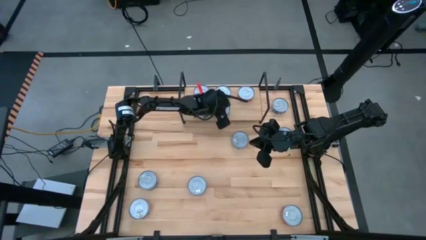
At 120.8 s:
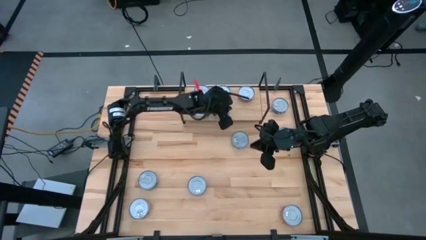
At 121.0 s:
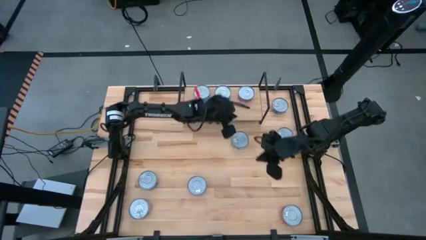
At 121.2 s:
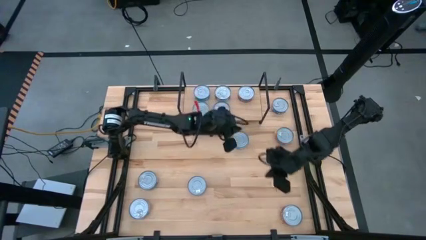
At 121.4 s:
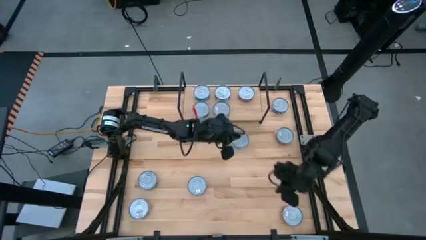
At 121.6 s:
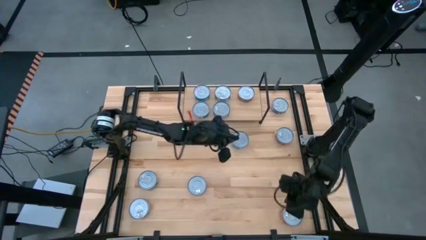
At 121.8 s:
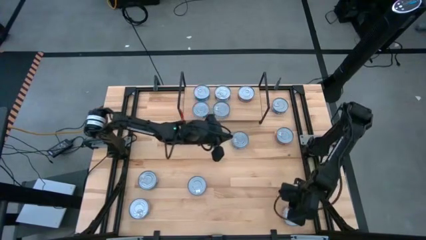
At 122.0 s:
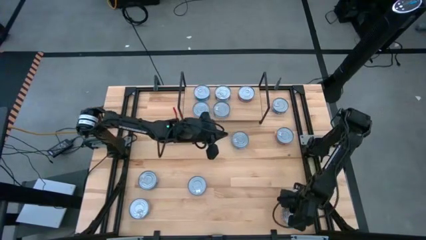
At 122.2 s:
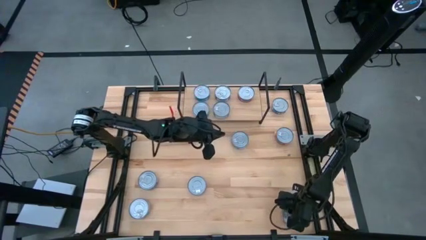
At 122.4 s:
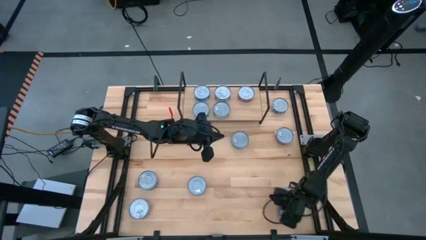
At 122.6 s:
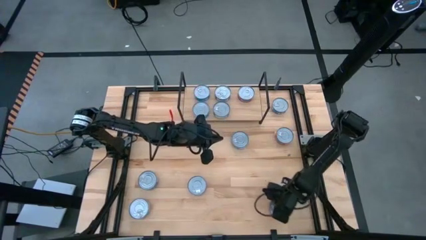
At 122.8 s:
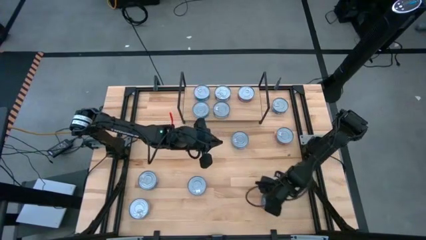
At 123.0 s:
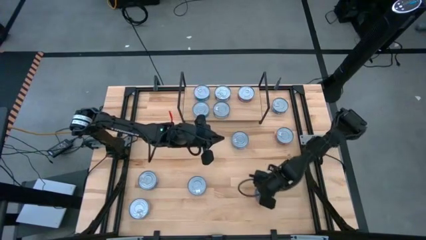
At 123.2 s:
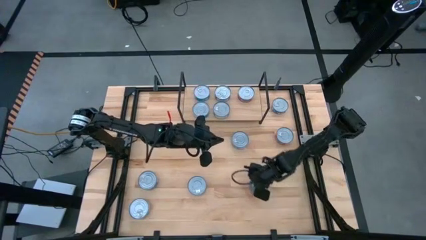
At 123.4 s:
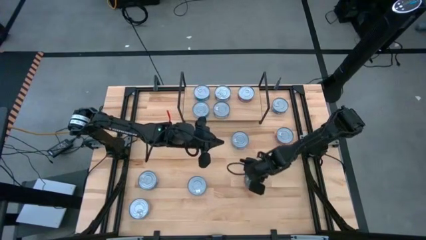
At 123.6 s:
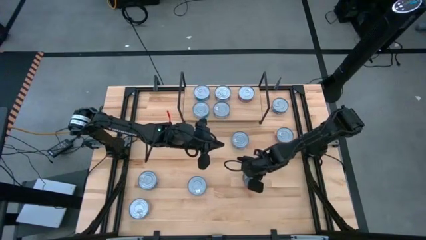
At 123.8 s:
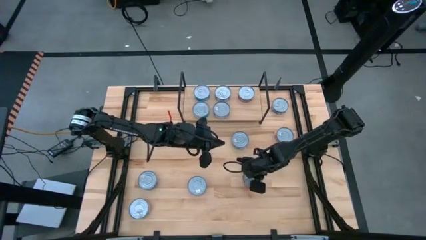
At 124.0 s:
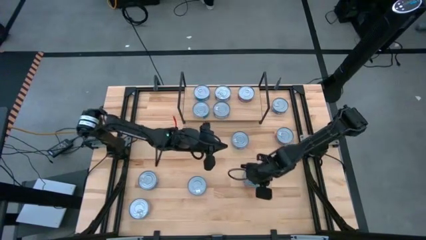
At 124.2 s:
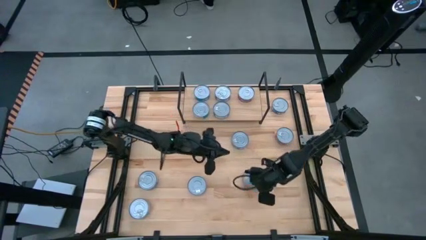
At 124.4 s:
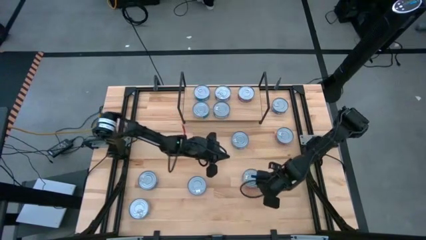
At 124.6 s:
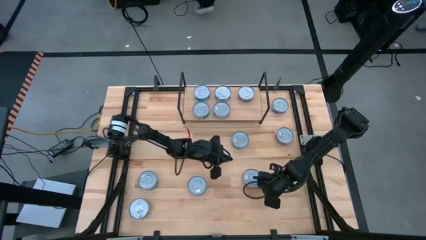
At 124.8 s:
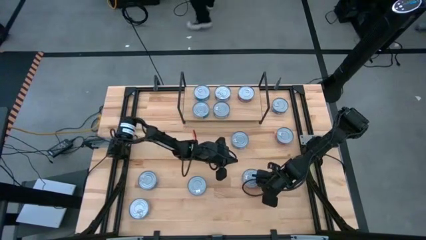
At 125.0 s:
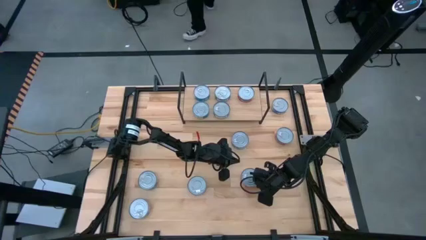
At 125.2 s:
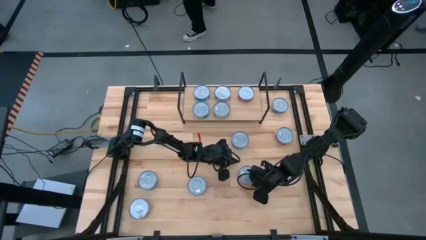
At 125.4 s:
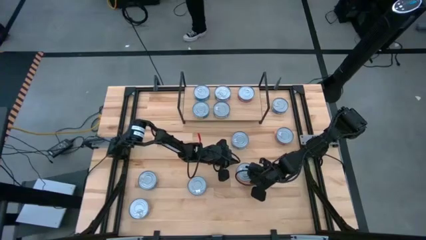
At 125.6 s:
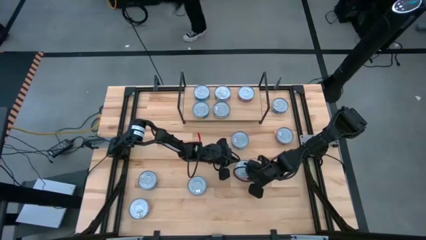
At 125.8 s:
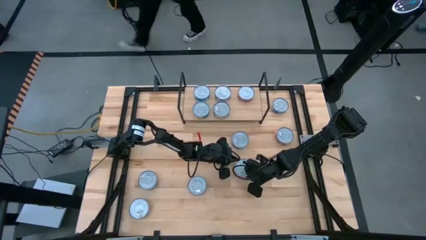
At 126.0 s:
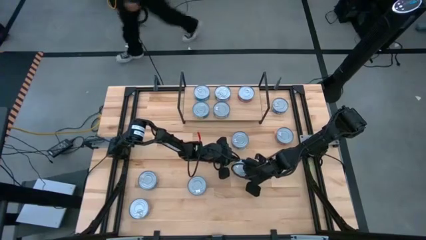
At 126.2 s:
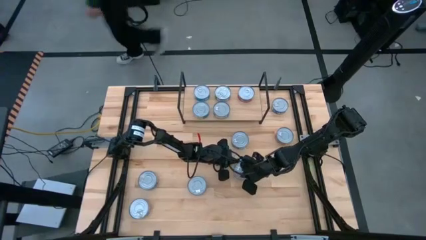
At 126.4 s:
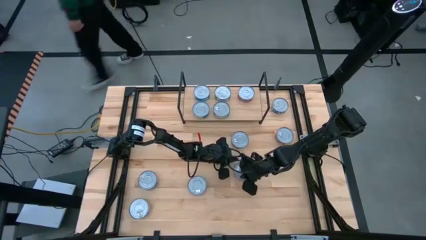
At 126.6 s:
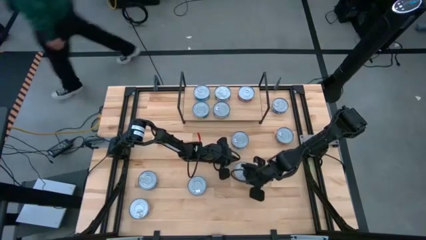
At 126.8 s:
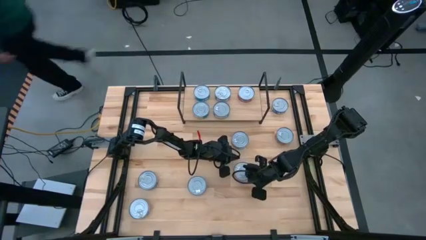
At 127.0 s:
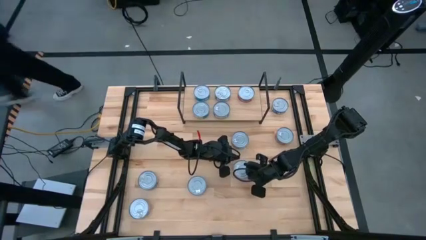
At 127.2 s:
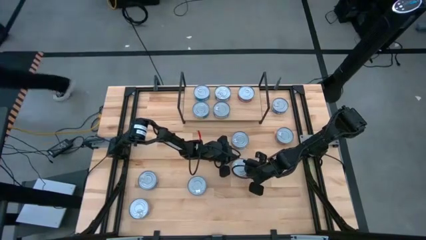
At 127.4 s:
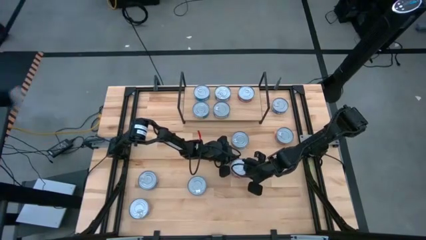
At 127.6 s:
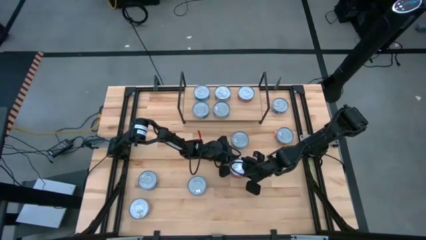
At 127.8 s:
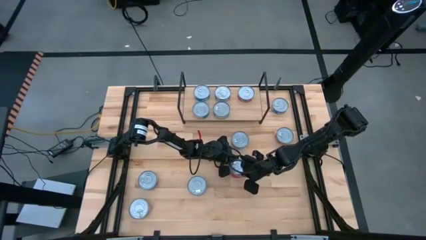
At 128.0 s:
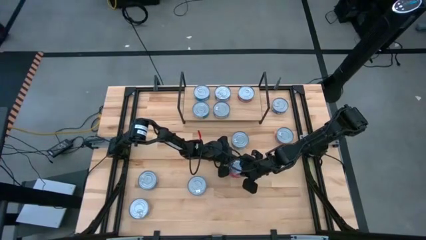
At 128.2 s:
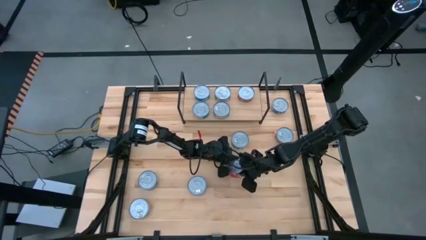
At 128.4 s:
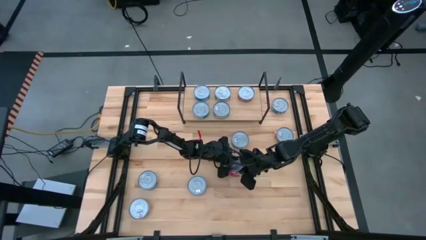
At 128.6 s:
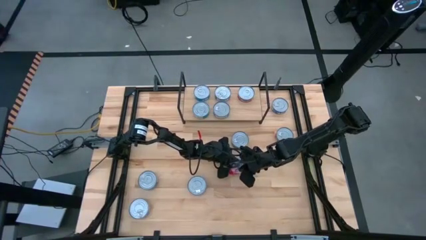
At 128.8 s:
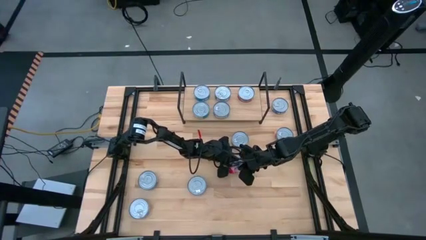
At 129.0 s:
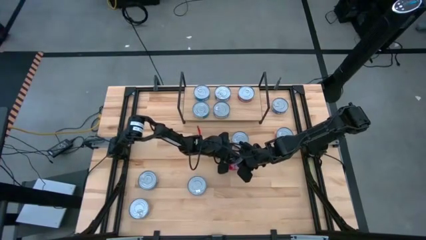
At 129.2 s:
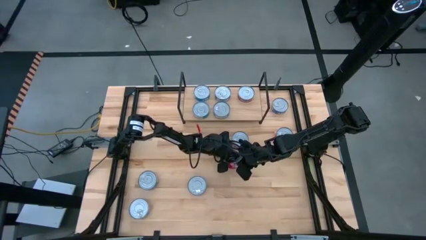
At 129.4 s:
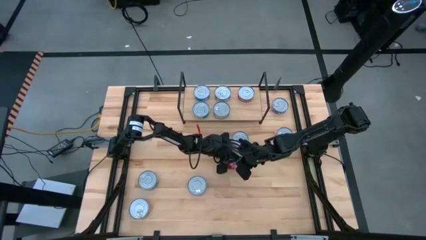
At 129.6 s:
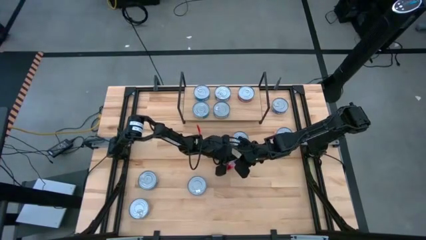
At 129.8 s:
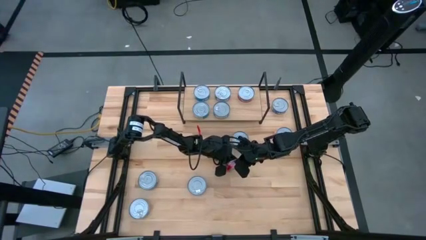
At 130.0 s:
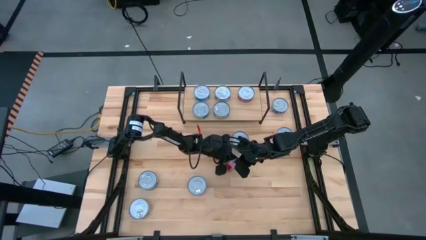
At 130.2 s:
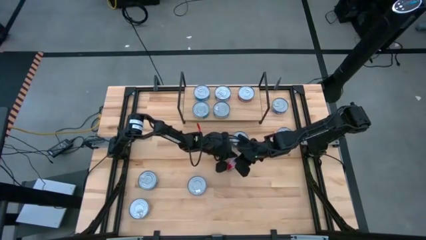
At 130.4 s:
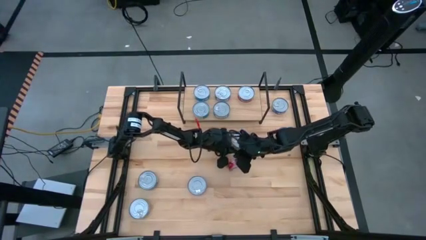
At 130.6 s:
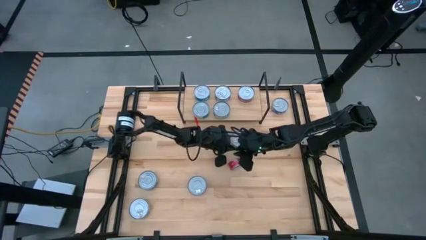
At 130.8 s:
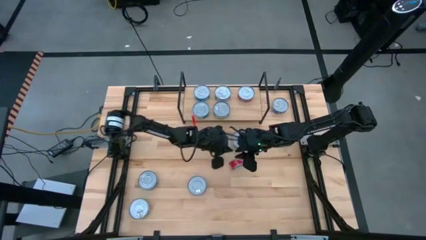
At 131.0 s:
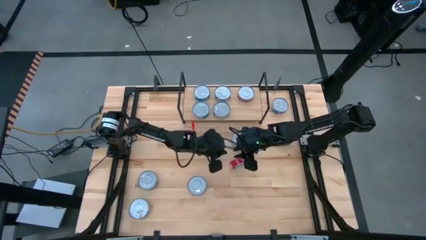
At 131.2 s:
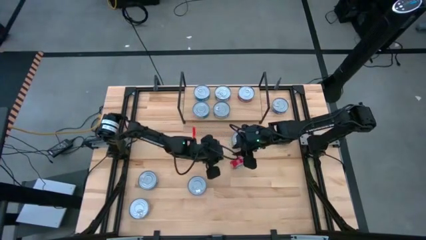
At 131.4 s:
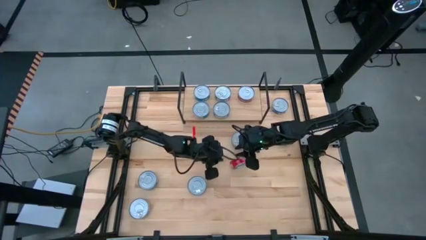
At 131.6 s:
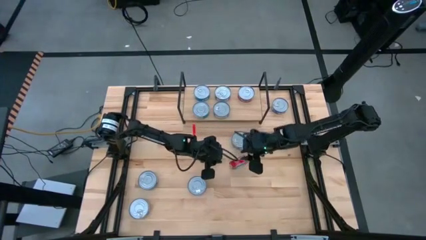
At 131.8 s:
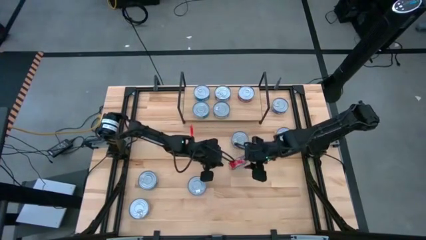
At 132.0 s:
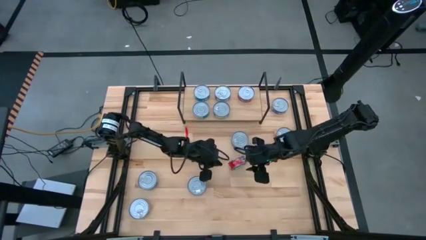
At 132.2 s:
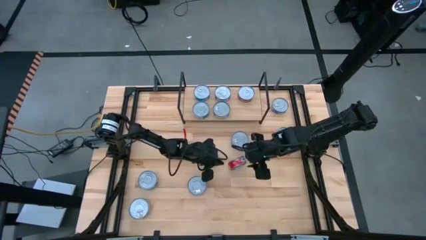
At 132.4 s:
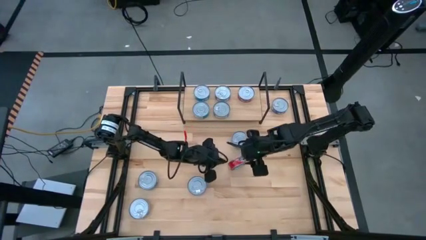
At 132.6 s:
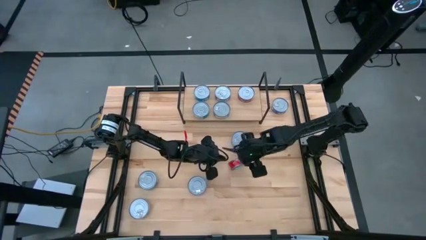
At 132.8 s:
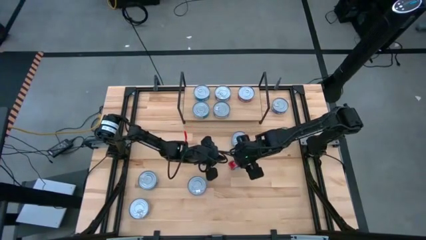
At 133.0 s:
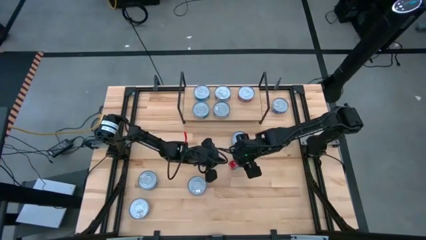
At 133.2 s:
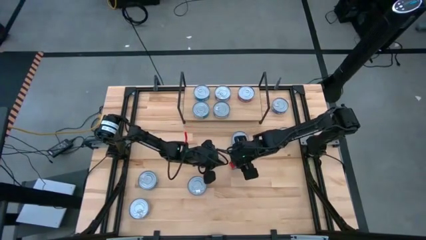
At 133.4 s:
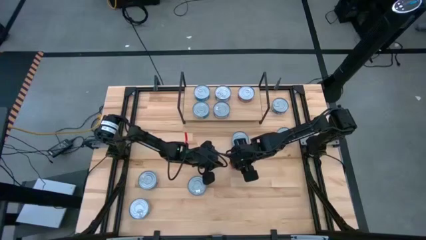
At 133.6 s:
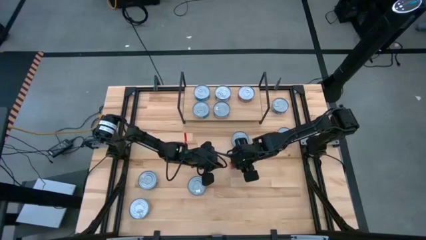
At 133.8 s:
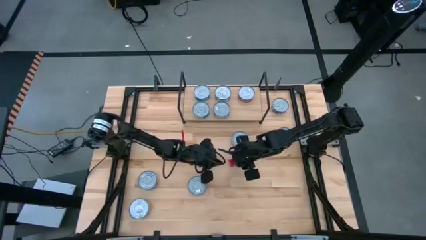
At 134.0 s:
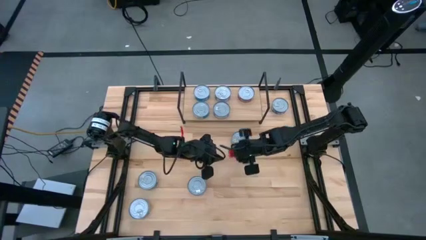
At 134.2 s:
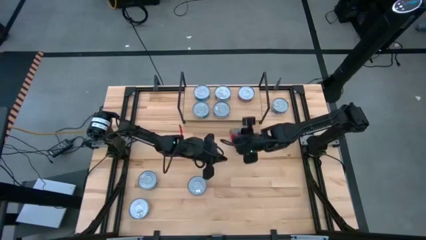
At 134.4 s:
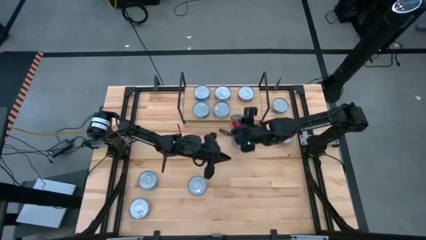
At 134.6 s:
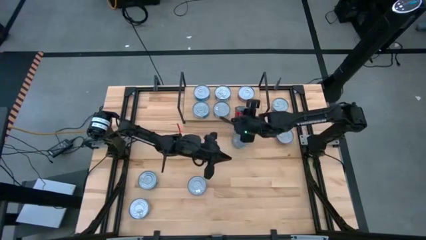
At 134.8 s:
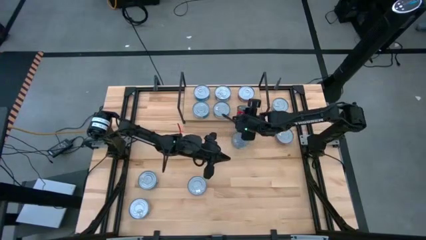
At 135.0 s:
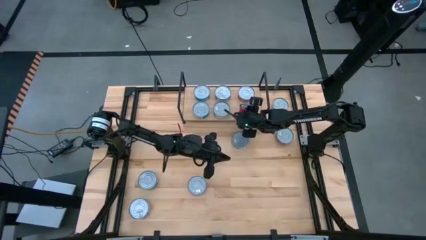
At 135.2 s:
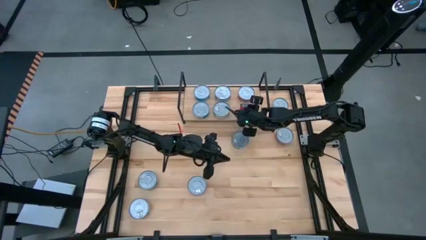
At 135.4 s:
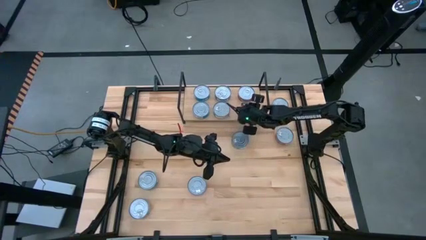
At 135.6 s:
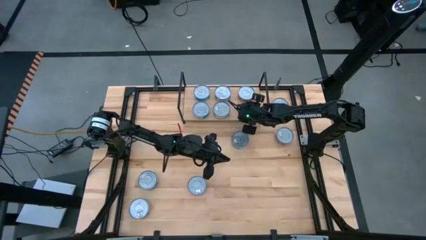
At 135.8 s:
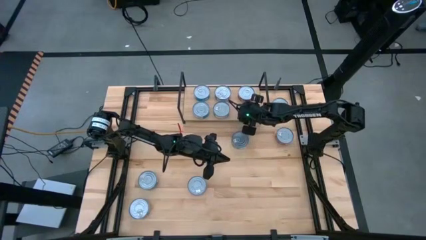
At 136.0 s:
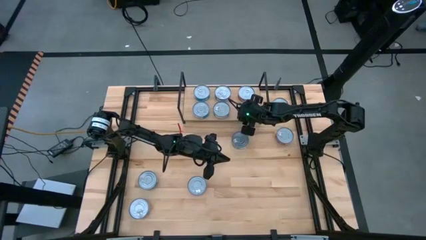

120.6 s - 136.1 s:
Task: Stack canned seafood by type on shelf
Put the red tuna can on the shelf
